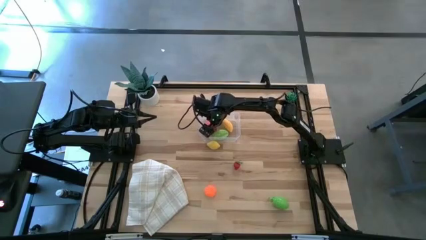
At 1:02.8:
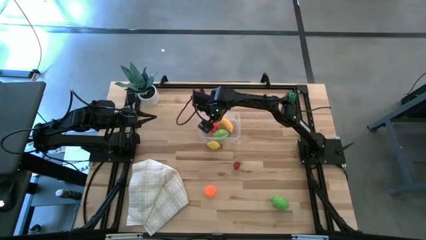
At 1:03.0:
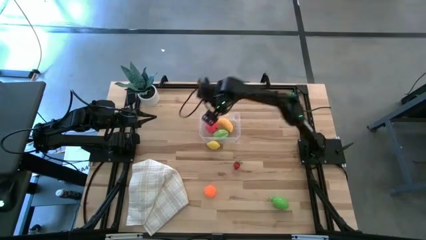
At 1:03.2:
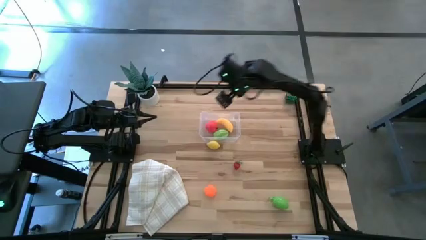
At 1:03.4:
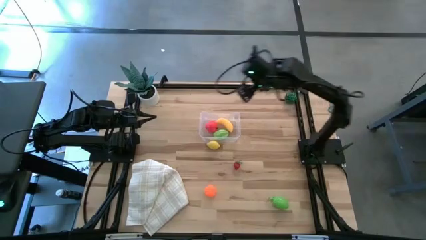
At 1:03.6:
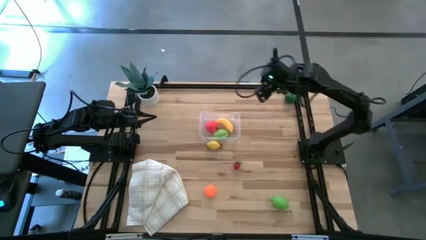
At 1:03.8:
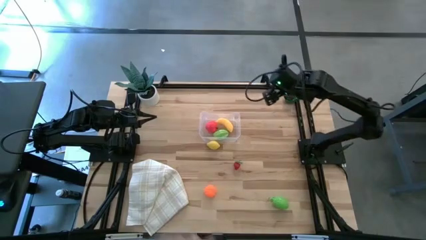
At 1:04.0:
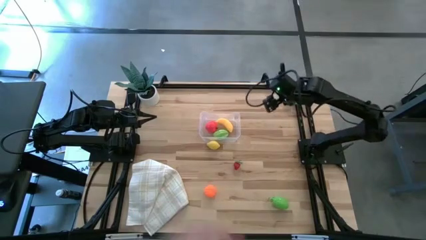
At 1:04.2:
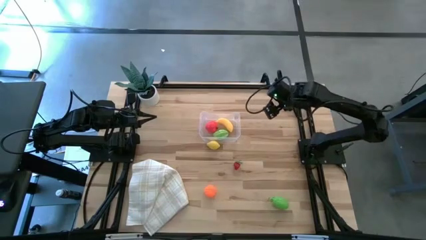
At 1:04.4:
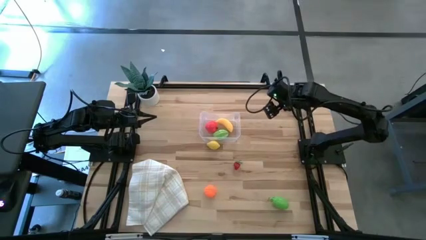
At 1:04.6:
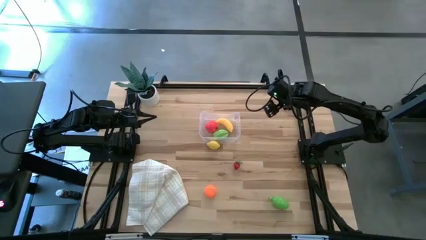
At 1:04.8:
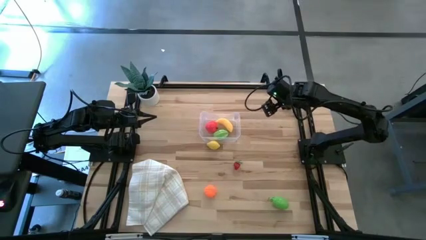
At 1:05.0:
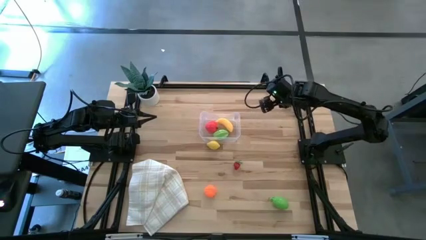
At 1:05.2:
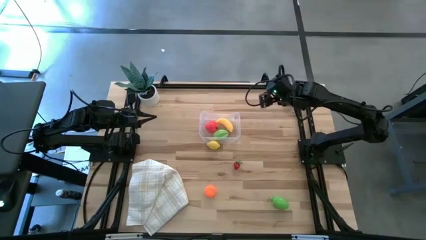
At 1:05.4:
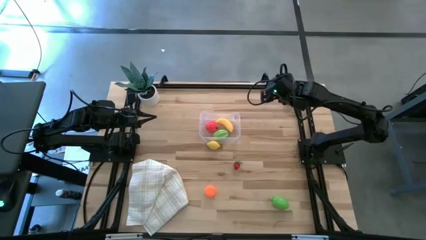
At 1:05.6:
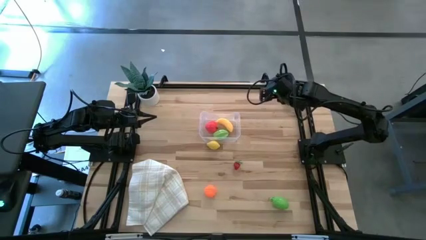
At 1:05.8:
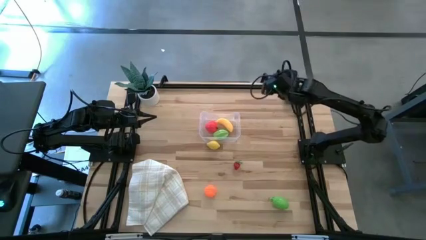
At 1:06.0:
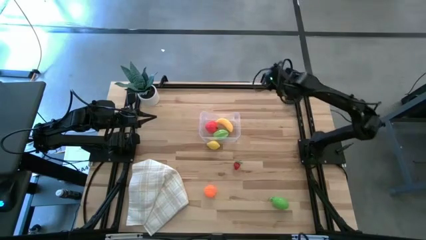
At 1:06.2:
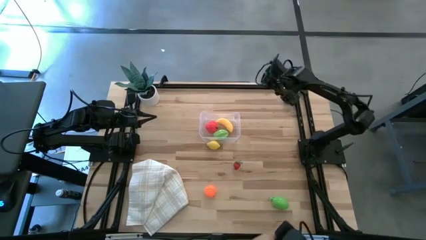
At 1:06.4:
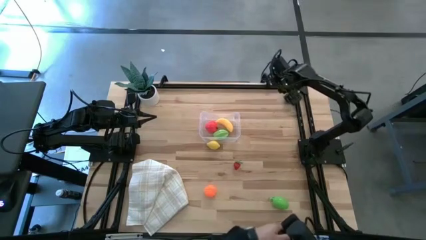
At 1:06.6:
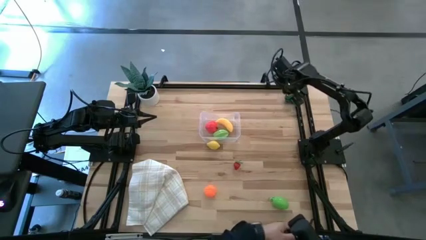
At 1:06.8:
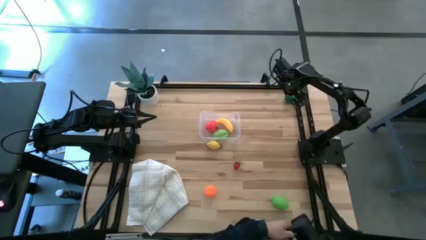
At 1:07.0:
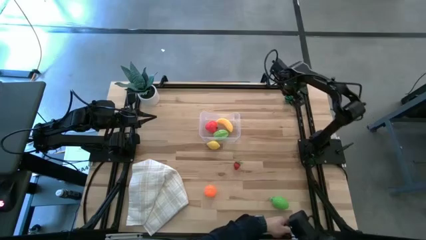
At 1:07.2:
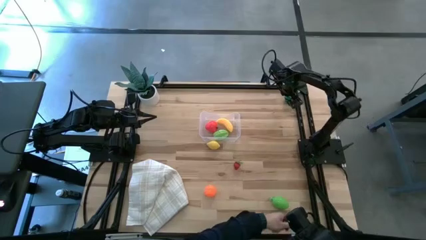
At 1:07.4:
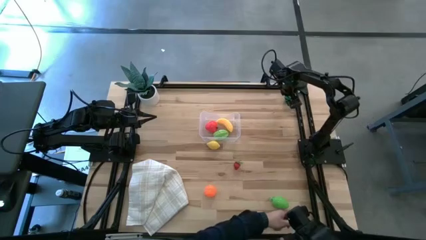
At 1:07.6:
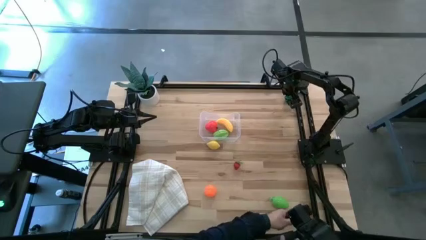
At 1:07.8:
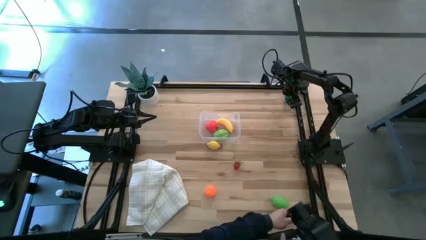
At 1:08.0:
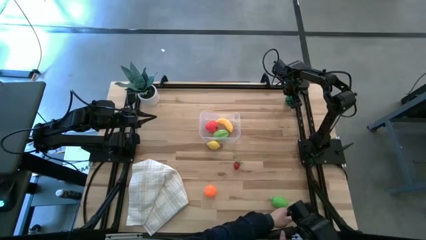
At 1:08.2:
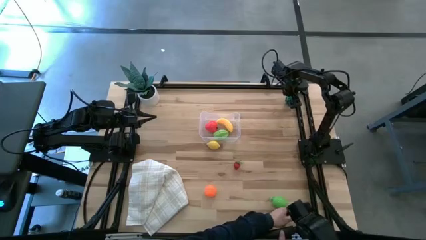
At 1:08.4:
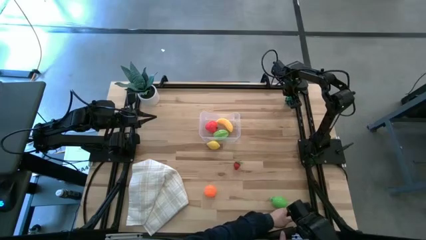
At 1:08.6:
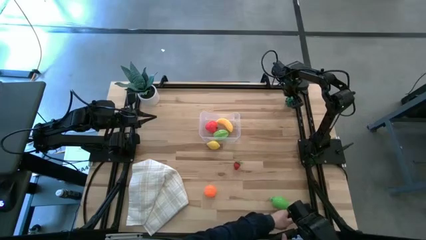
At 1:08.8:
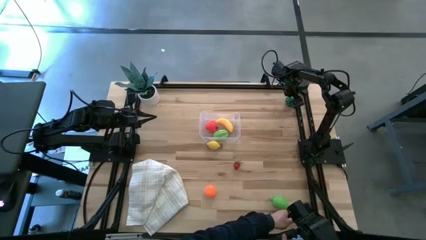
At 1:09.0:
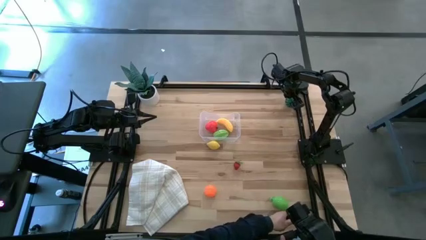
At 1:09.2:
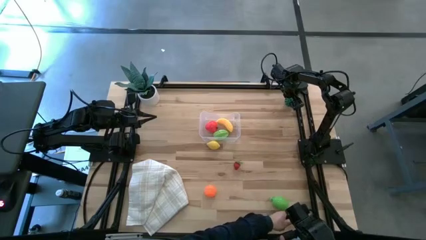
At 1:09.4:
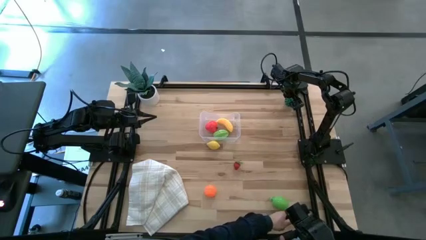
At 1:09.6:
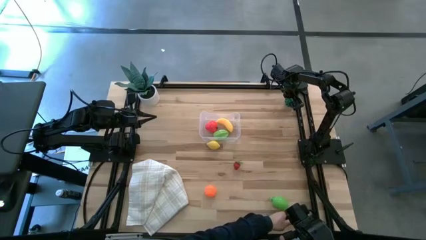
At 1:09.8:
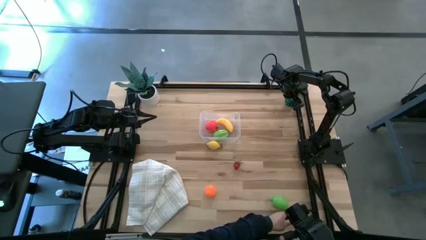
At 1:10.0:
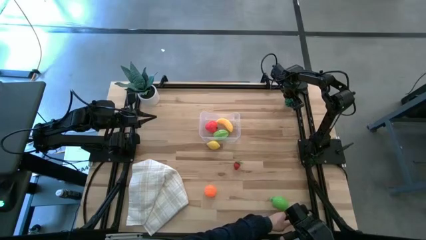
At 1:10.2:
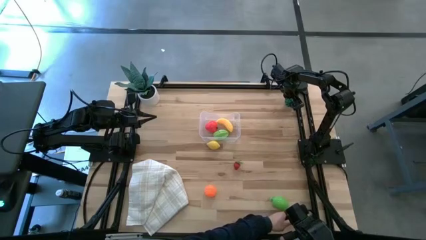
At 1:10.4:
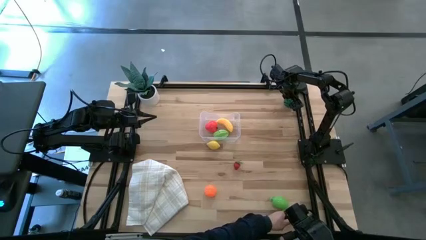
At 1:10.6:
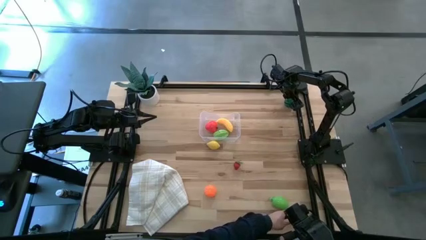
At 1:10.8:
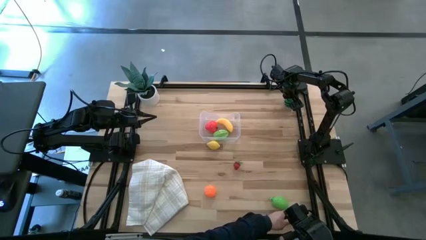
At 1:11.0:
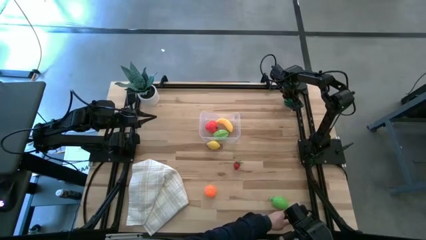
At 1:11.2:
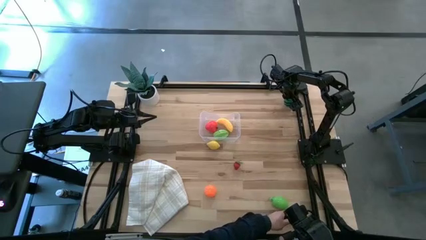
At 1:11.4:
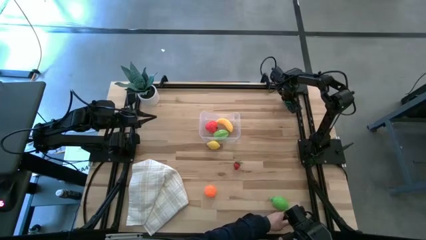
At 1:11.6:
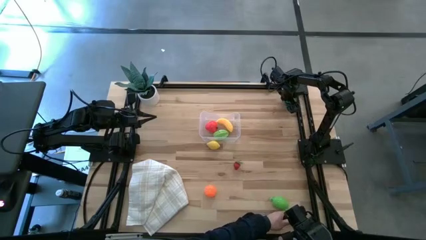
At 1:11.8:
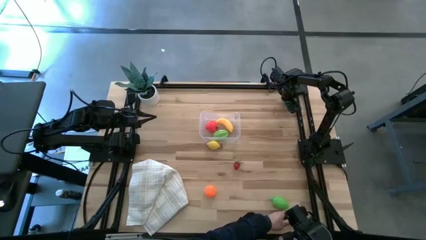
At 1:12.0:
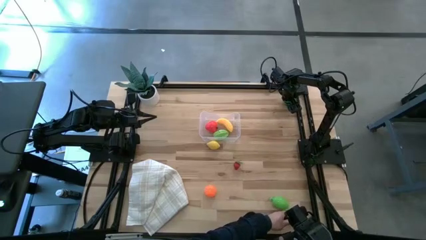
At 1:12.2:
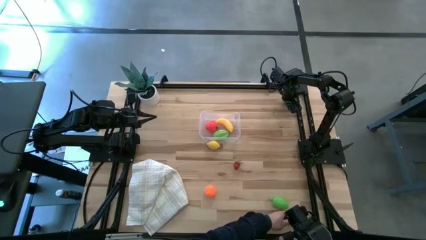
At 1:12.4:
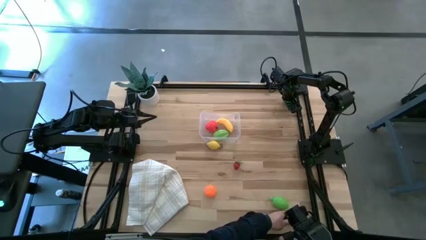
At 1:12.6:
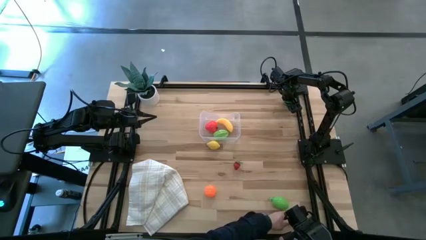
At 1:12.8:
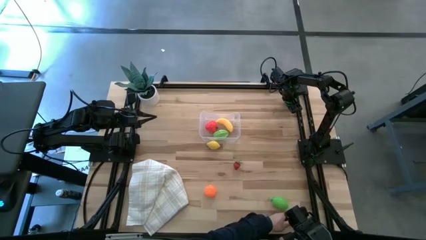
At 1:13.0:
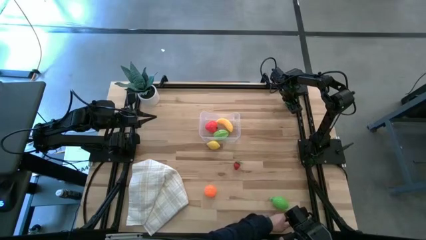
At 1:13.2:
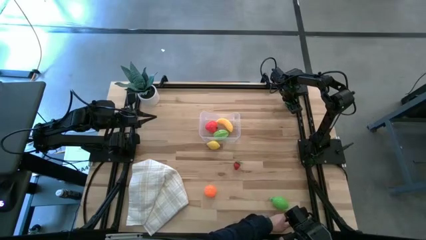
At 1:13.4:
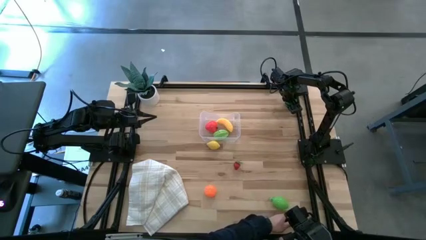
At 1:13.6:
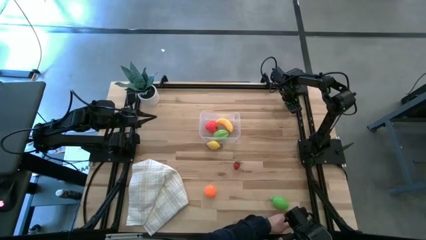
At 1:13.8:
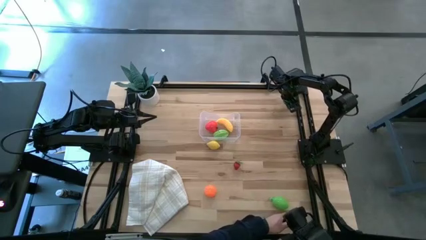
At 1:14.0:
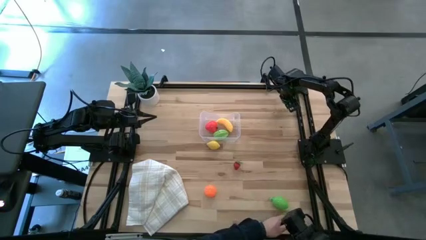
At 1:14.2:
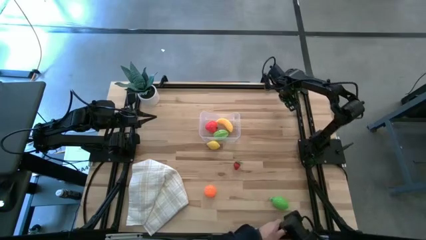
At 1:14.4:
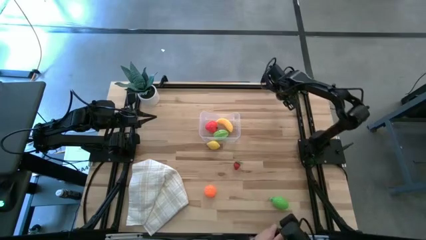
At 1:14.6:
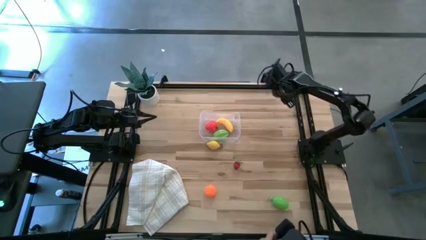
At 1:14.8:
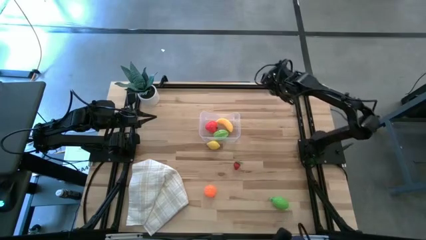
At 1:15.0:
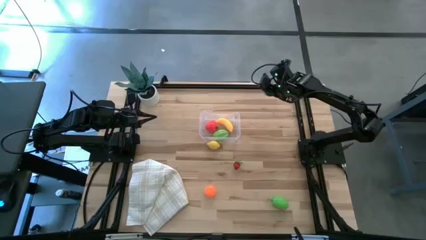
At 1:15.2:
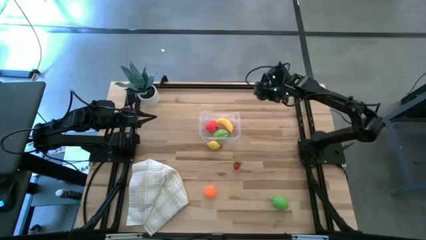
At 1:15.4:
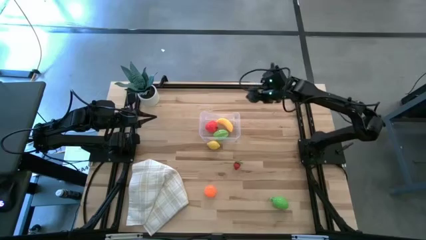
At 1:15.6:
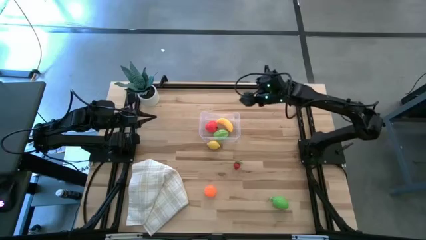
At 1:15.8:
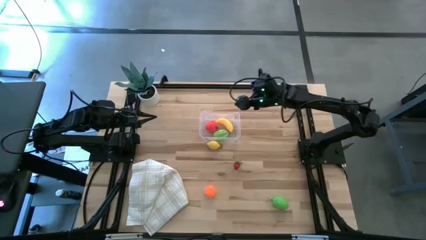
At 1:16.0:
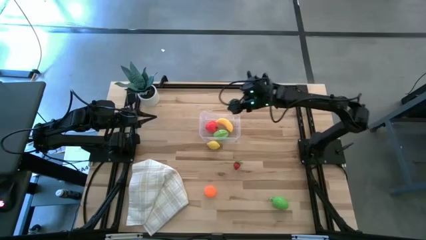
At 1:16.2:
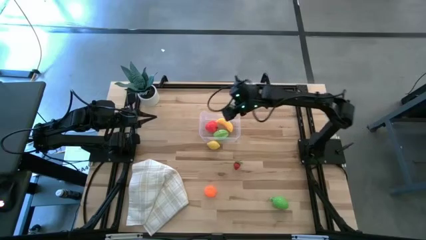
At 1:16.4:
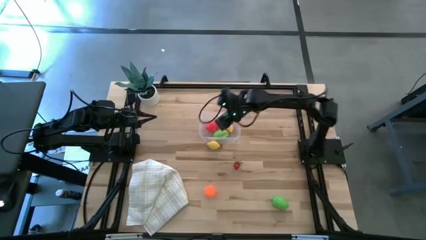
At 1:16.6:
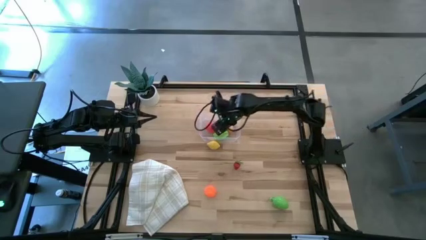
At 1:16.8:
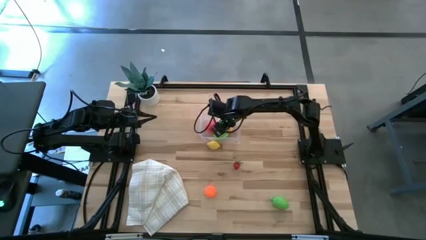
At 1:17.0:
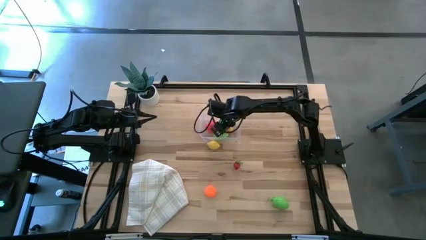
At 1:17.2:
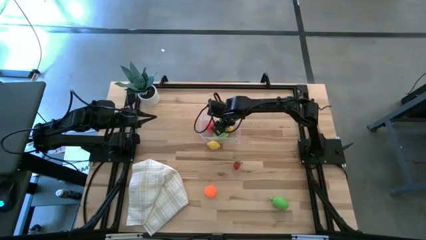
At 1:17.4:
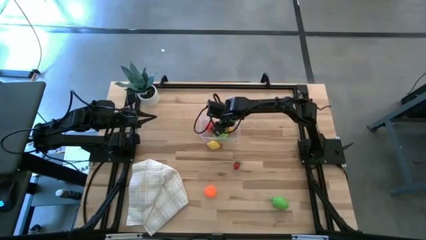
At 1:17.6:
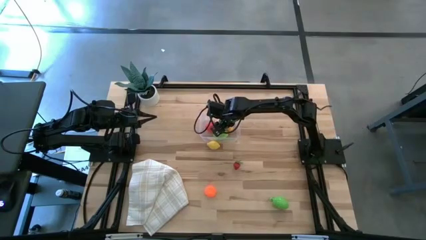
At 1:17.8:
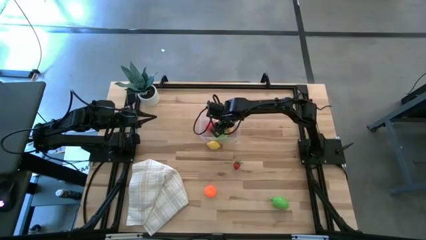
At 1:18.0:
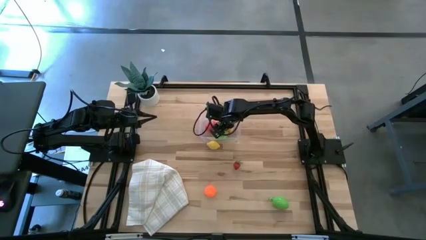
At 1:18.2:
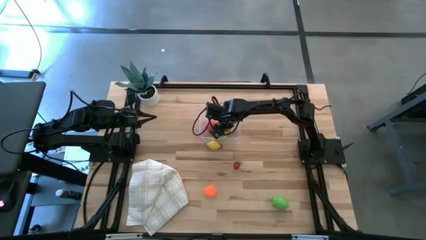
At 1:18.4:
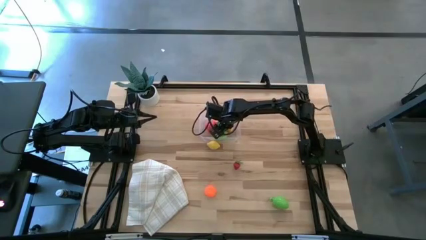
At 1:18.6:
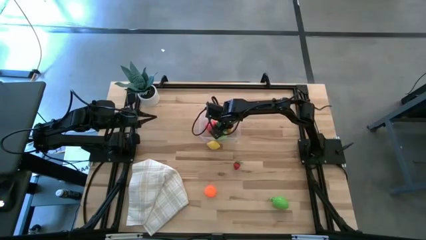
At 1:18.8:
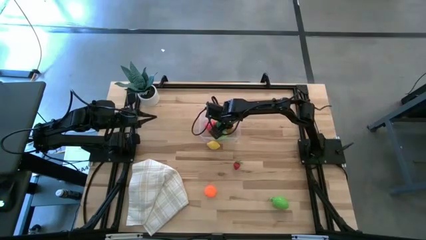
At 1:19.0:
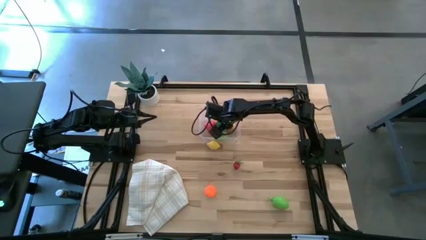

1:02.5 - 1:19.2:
Task: Pick and placing Produce into tupperware
Put the watermelon into the transparent bin
